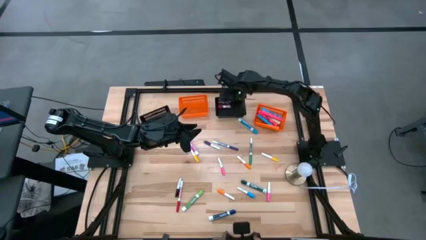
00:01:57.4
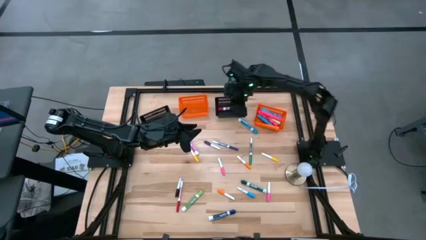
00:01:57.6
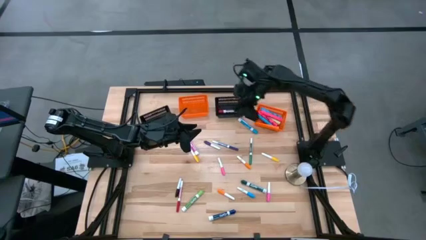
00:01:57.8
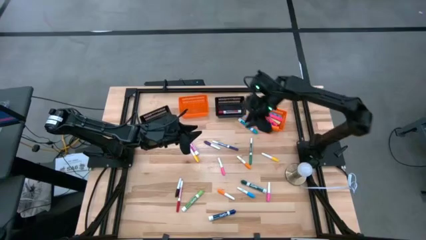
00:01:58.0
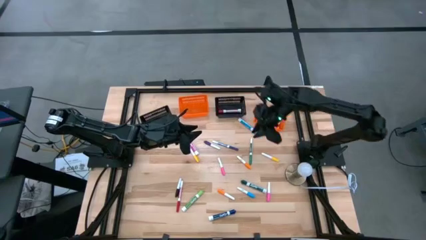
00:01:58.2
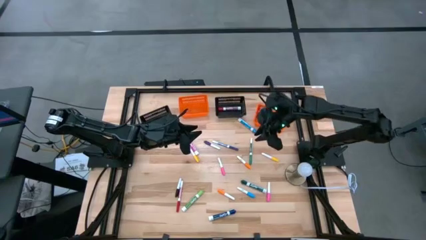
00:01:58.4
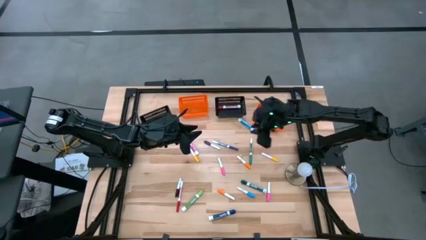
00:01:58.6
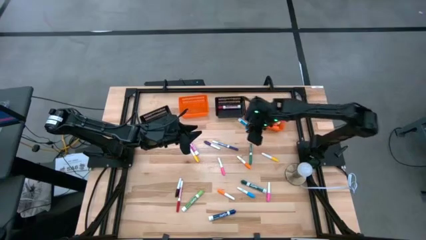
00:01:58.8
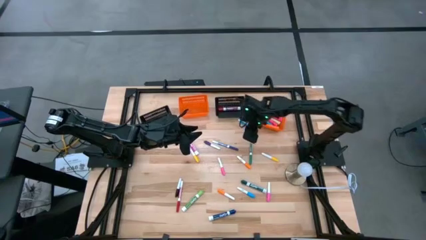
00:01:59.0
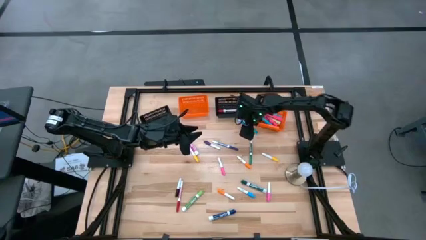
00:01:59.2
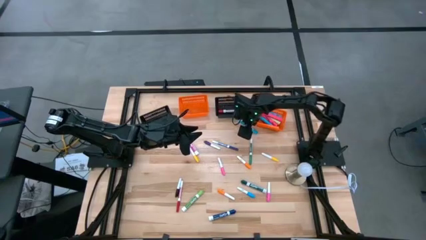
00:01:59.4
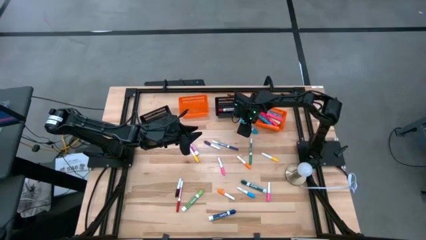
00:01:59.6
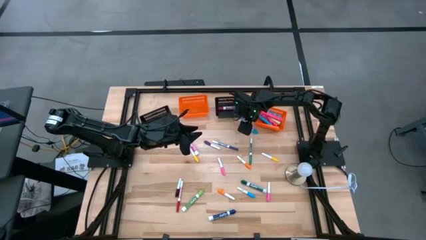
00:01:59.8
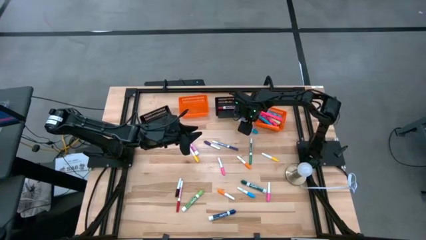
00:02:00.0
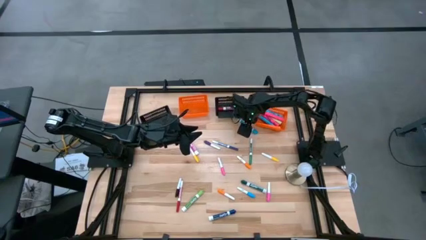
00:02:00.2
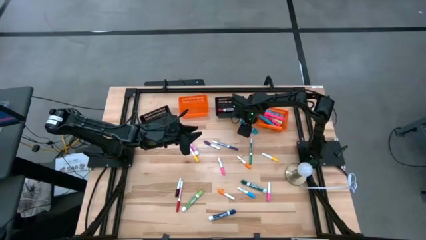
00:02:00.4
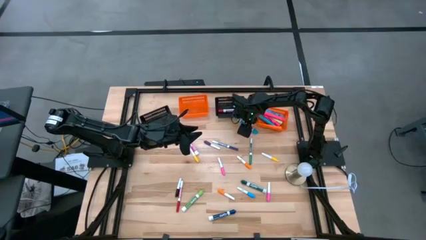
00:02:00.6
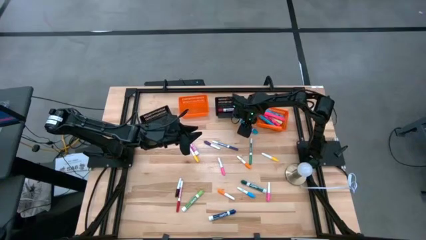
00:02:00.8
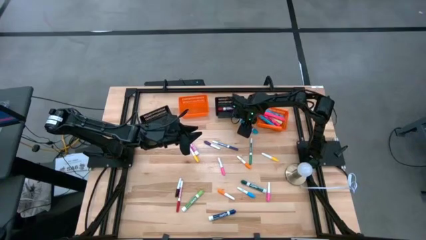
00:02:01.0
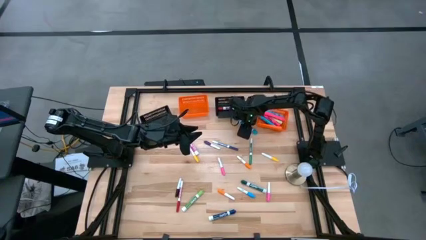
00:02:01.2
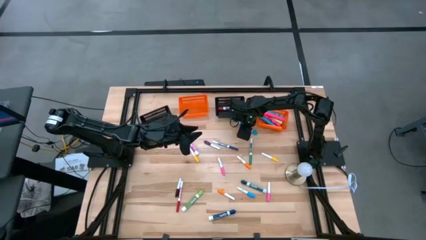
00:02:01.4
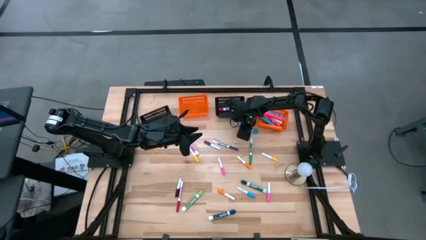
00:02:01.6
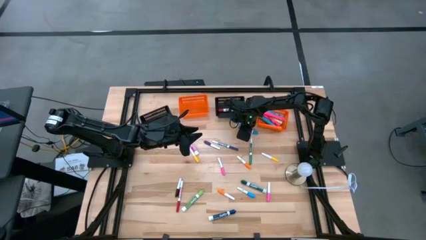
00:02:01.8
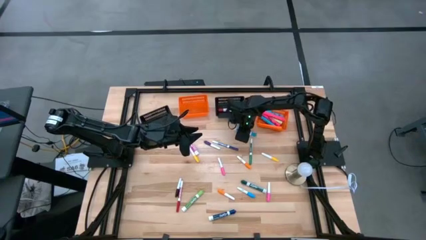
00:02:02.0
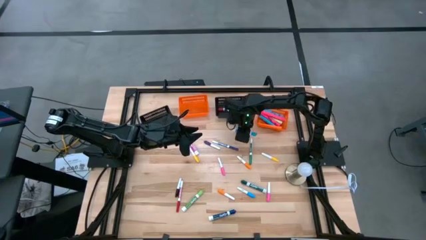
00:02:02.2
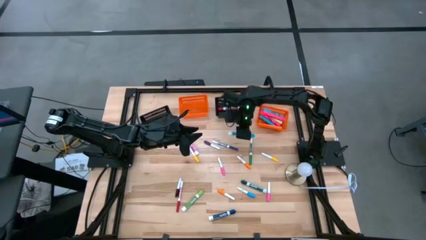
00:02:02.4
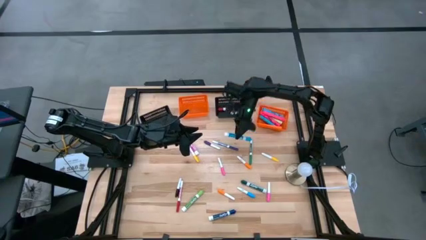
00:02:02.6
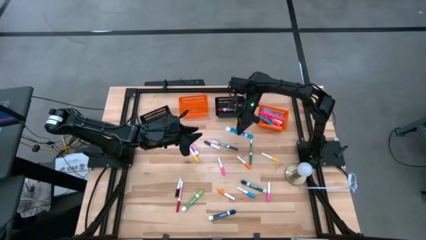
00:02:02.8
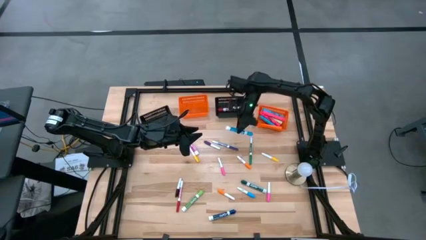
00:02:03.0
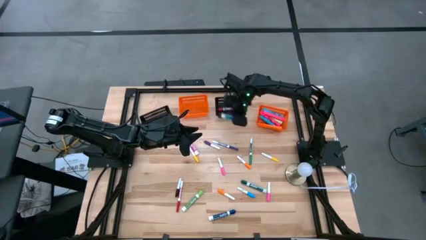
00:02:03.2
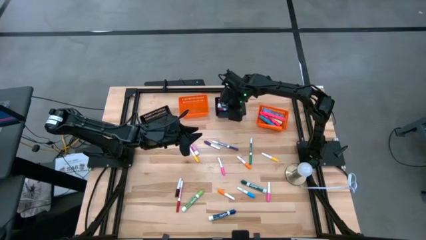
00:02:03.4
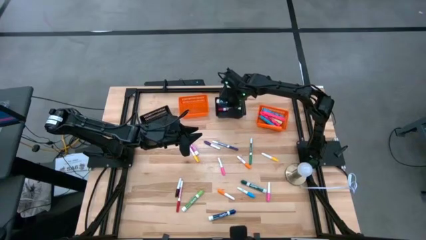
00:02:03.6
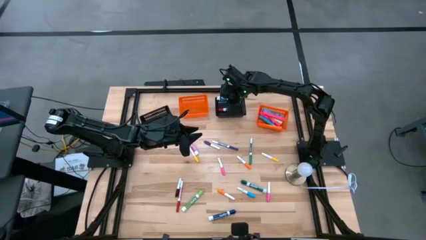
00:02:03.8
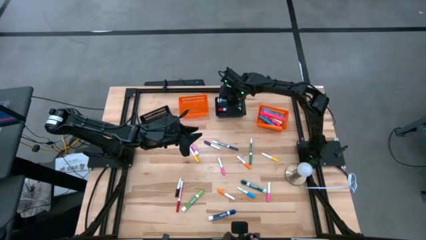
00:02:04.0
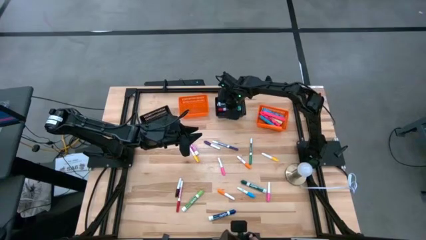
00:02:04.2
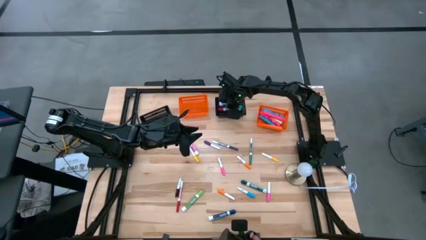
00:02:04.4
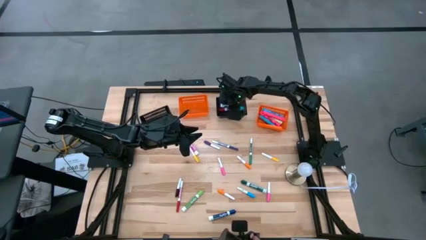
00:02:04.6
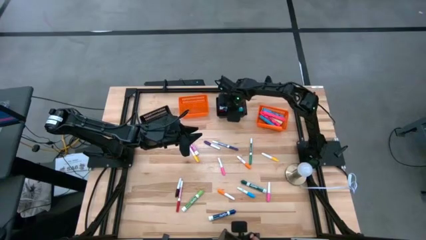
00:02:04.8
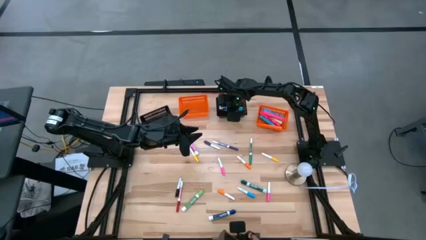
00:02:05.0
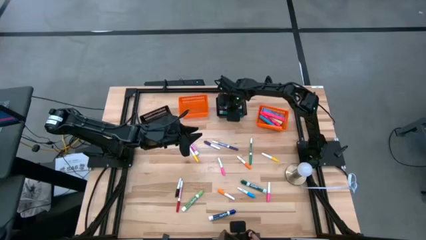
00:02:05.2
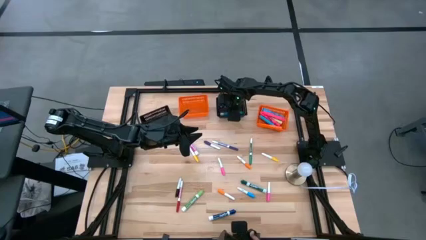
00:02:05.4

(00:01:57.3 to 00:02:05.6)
Task: Pick & Place Markers
Put the top white light blue marker into the middle black bin

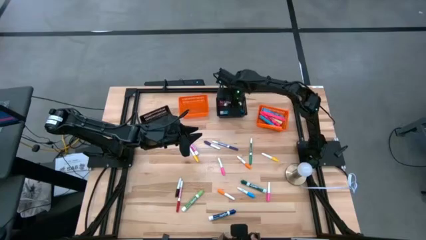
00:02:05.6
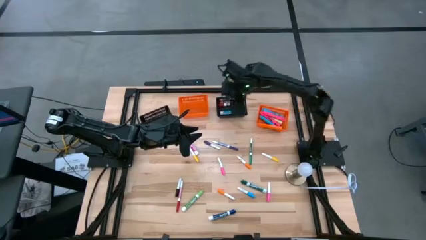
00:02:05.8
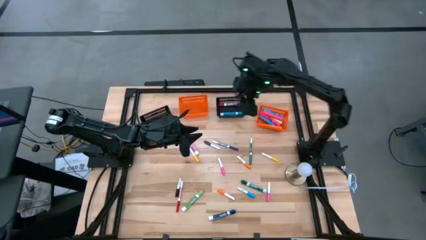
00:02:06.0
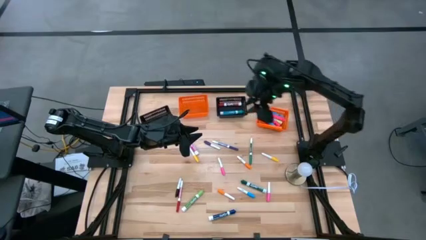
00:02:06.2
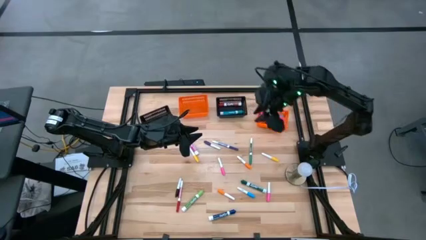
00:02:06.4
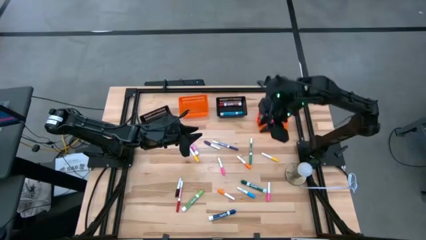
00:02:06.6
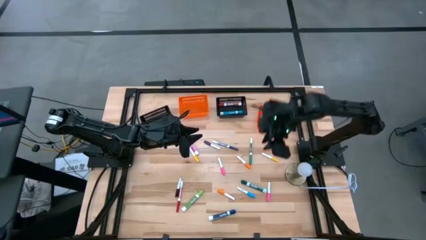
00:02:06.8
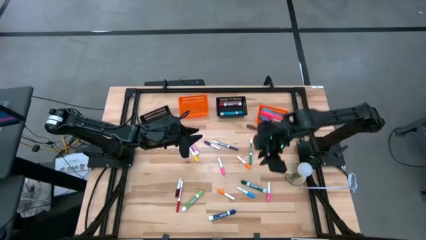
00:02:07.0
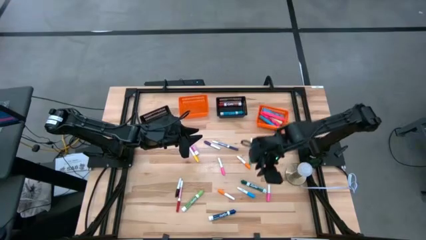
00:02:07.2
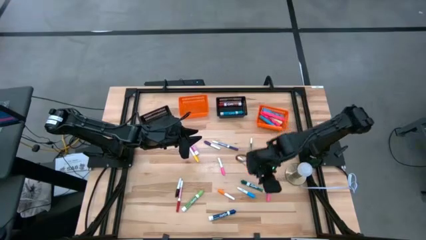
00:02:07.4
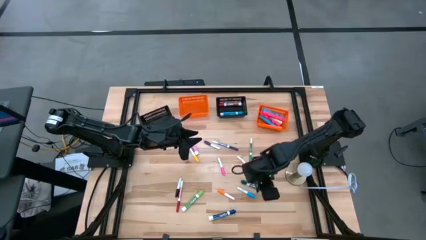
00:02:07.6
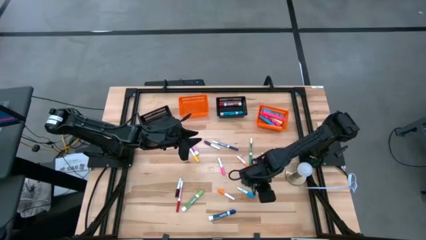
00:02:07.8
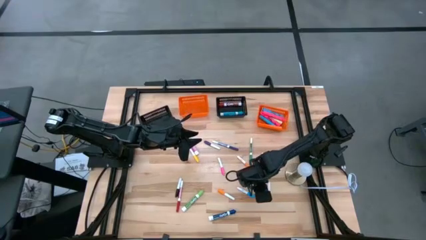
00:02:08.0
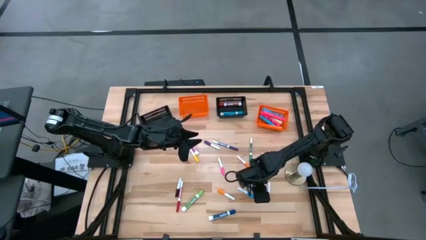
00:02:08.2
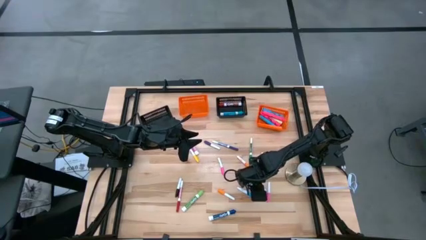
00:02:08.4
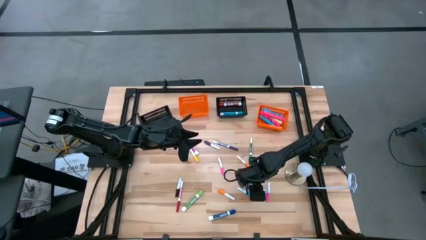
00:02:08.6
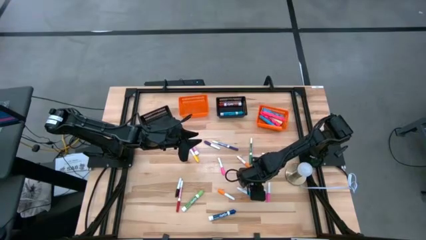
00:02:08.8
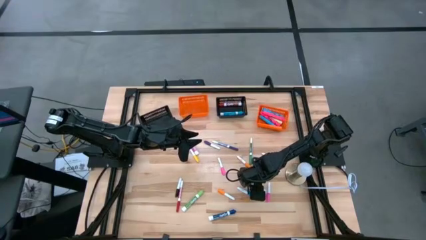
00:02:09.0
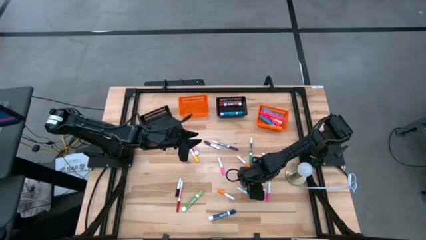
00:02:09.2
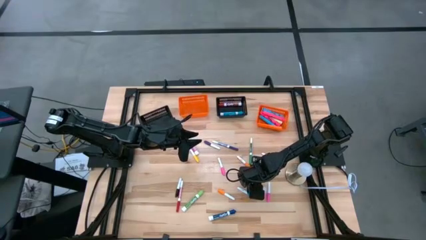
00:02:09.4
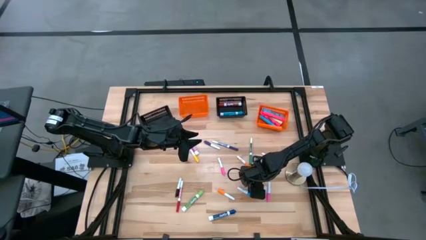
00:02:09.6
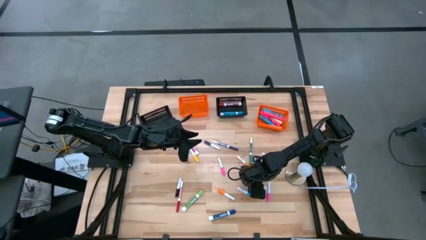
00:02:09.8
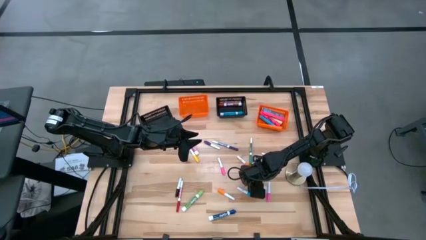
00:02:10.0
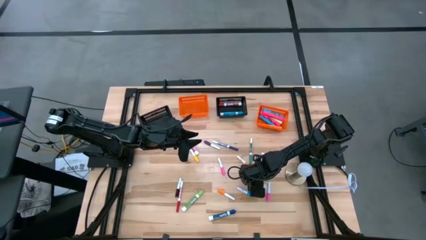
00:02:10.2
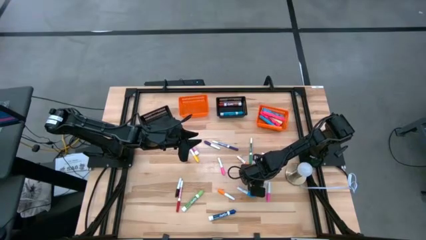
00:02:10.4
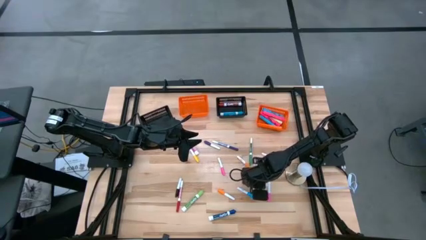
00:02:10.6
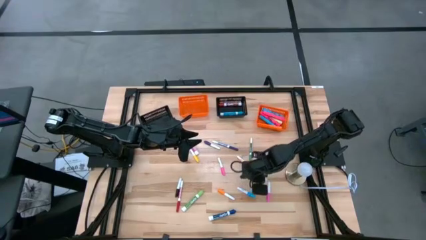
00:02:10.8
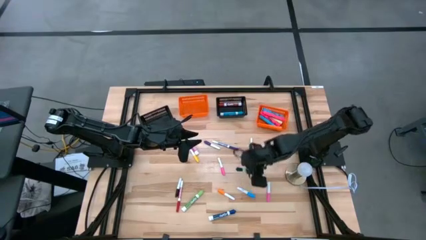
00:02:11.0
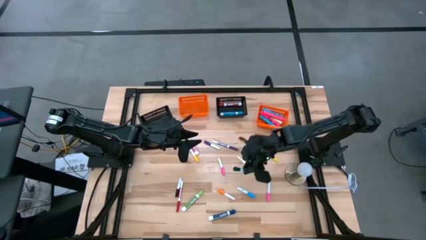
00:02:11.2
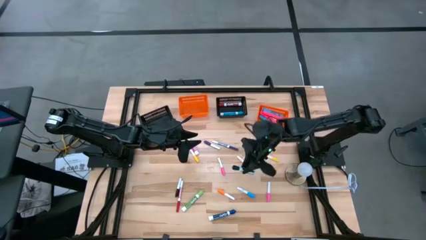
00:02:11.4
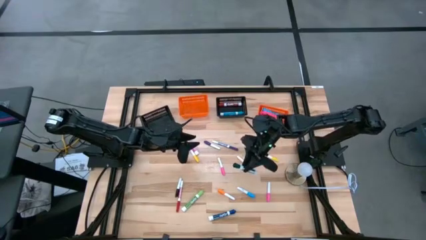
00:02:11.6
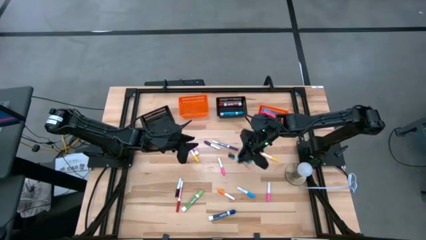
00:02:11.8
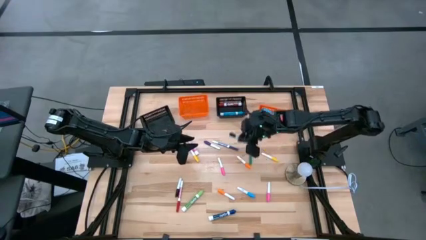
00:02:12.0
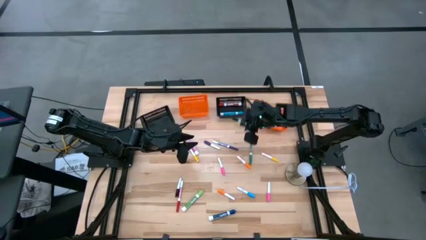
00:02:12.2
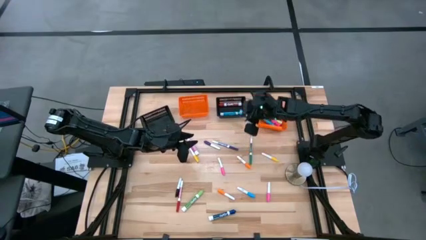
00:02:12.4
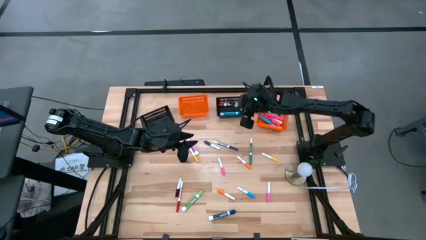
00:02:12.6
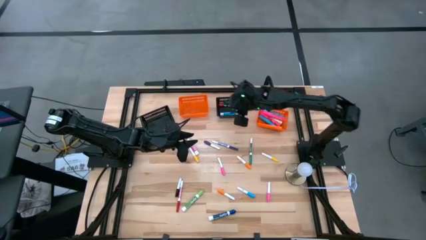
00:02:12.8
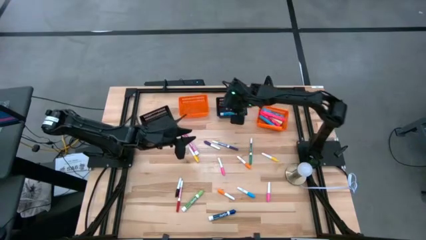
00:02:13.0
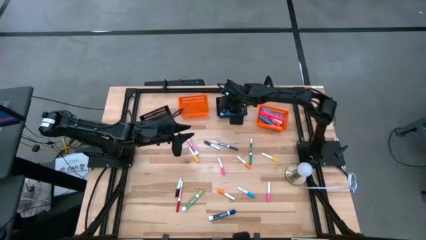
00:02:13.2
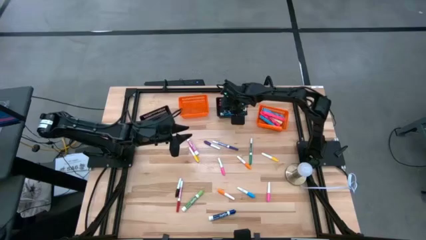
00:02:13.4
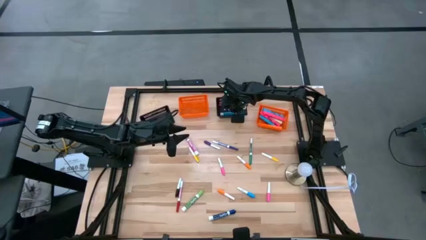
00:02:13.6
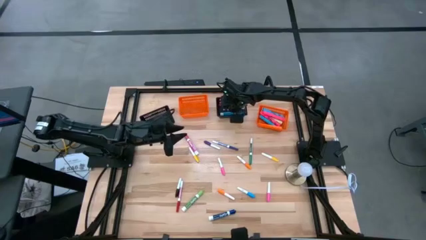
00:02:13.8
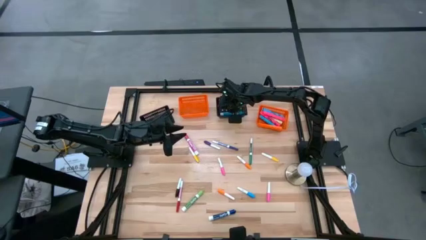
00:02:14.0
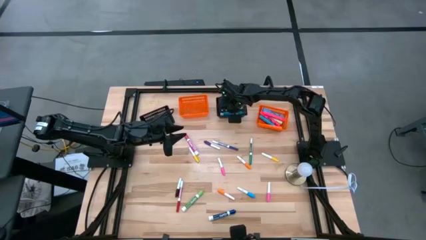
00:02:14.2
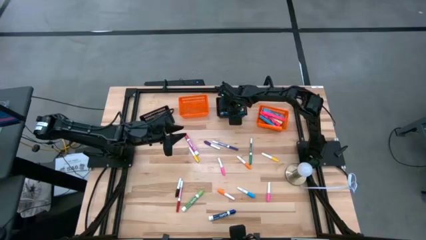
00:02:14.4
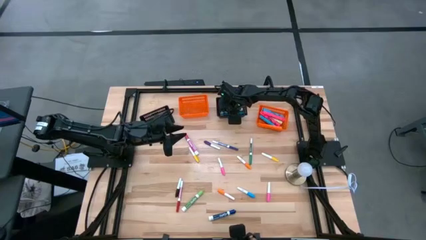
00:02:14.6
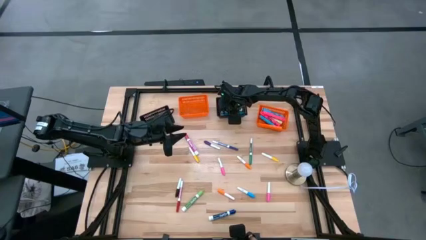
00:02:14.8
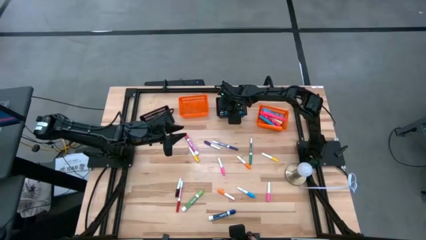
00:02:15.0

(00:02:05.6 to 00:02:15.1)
Put the bottom white dark green marker into the middle black bin

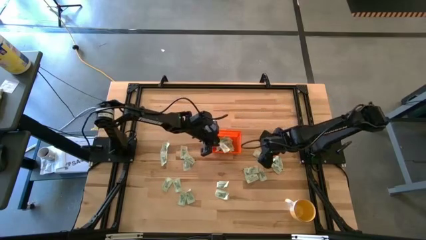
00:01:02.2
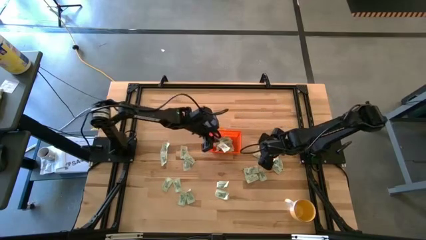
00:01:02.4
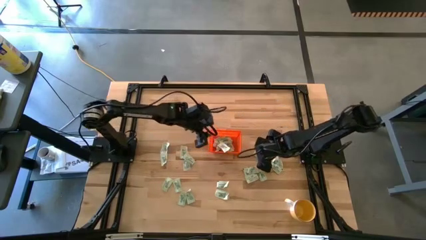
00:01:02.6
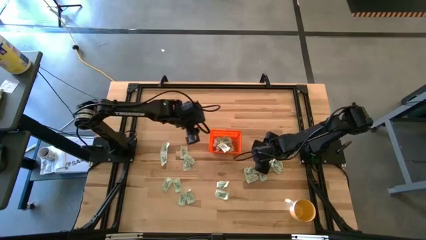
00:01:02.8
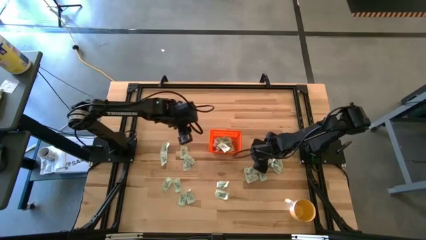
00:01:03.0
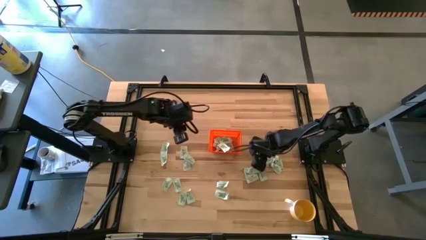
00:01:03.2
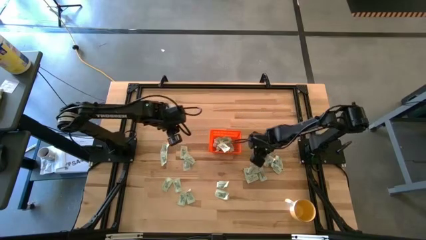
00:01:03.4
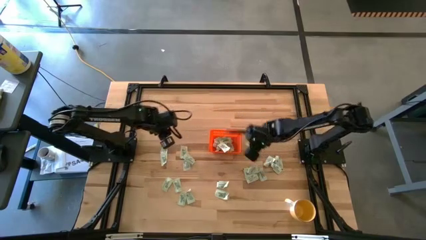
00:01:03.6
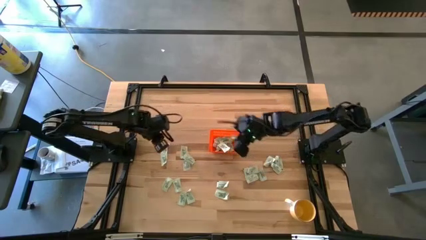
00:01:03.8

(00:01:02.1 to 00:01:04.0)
Task: Pick and place Stevia / Truvia into bins
Put the light green stevia packet into the orange basket
